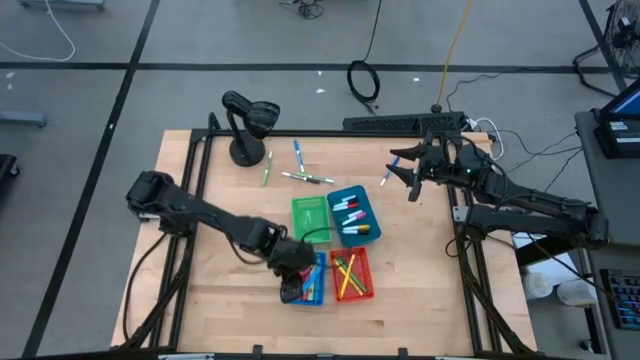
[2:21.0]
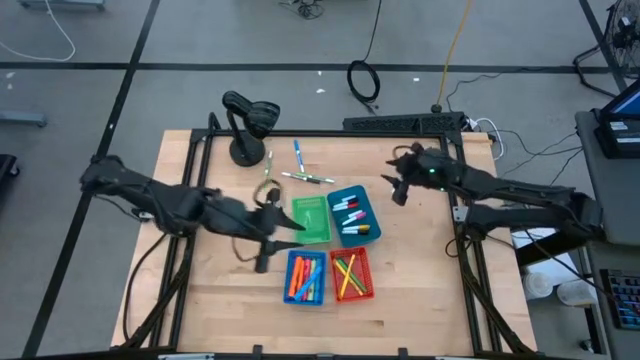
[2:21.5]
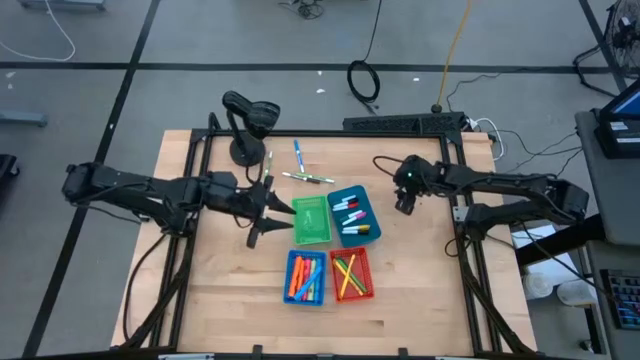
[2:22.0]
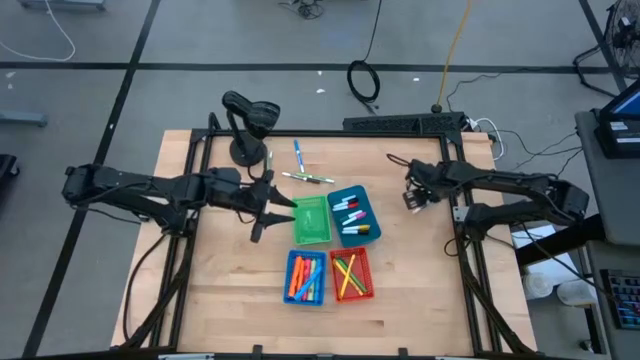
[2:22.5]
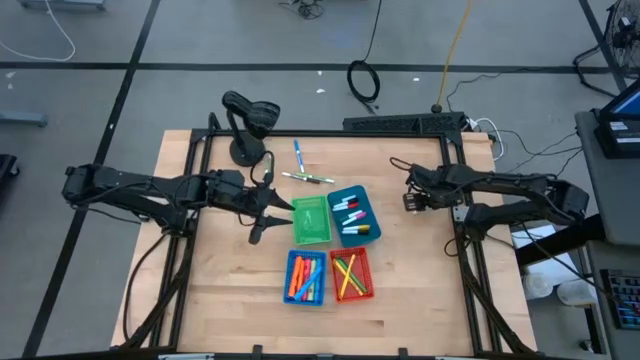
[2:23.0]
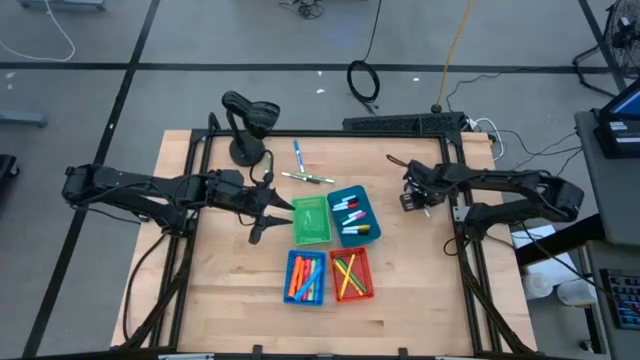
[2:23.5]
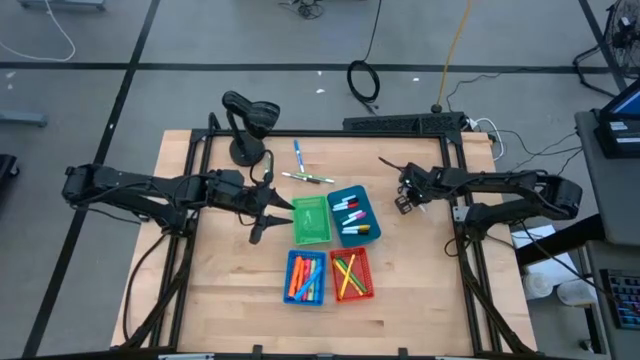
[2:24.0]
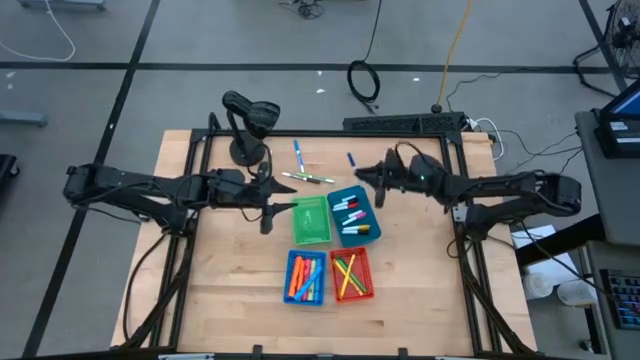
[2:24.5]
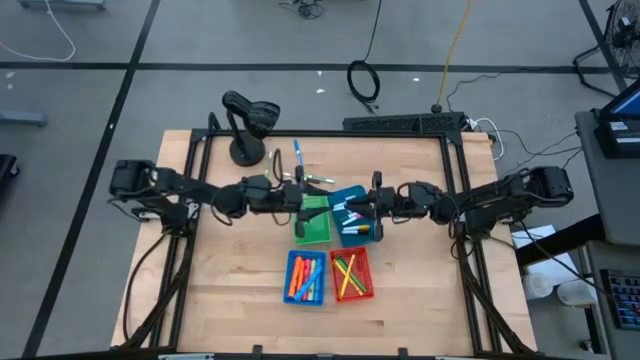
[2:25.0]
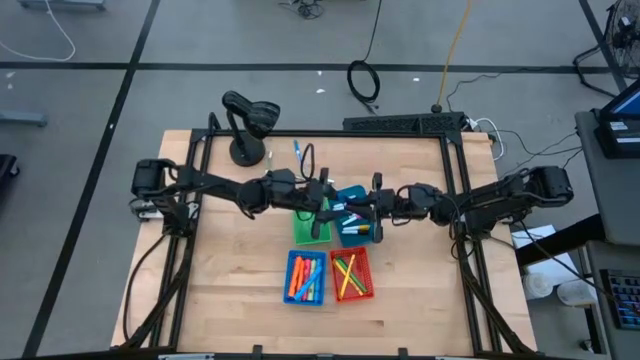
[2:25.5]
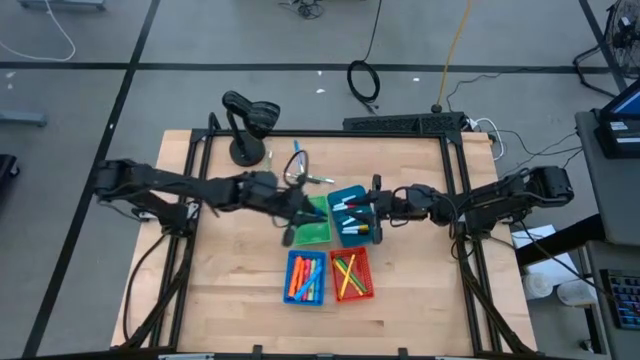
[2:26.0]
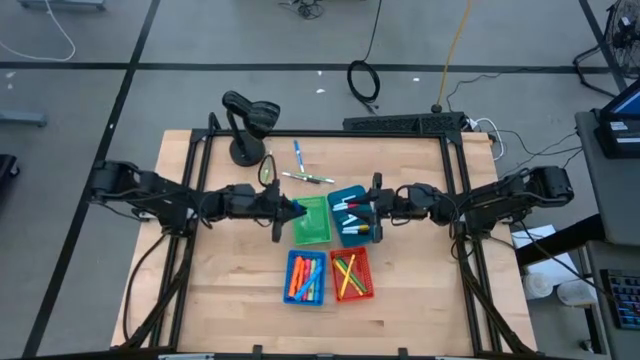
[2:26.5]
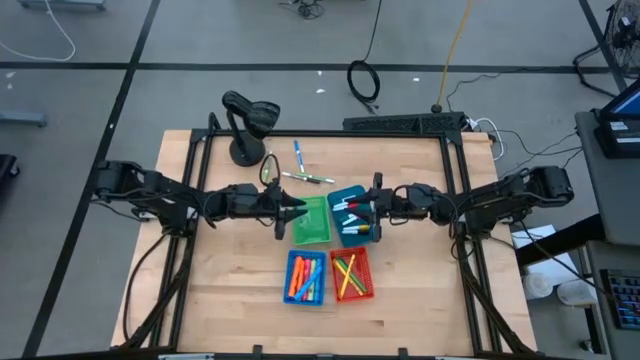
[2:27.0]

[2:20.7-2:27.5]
Task: Pick & Place Markers
Put the blue marker into the green bin

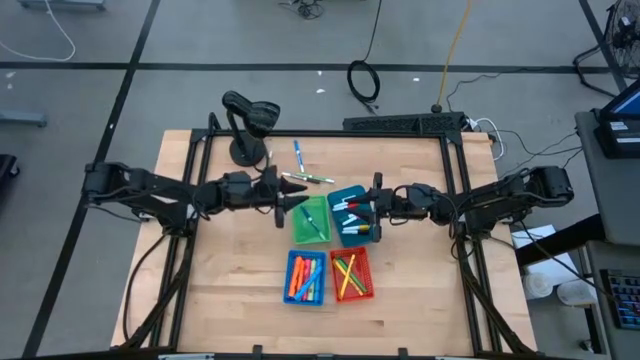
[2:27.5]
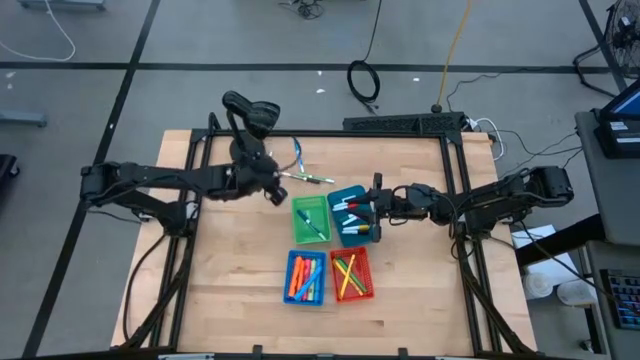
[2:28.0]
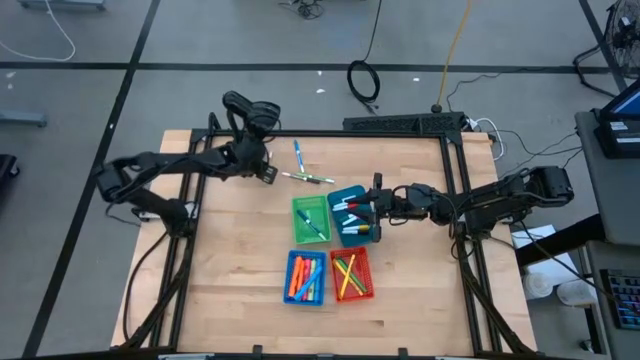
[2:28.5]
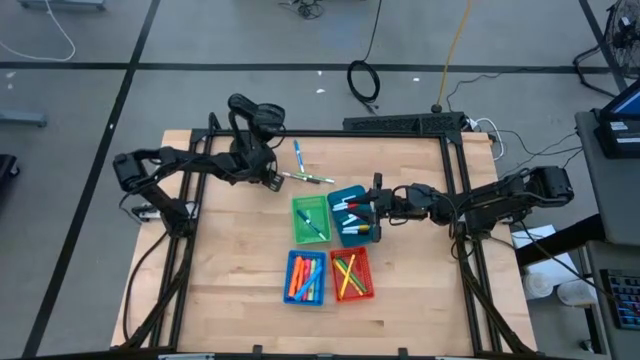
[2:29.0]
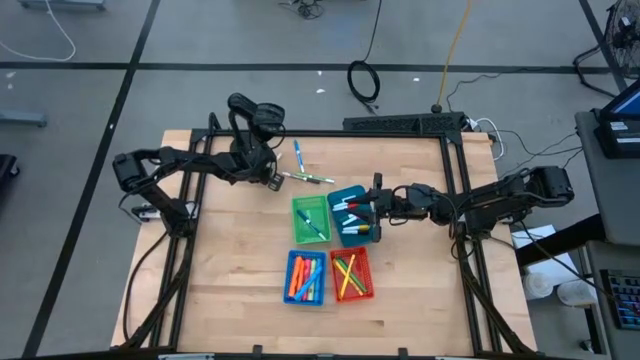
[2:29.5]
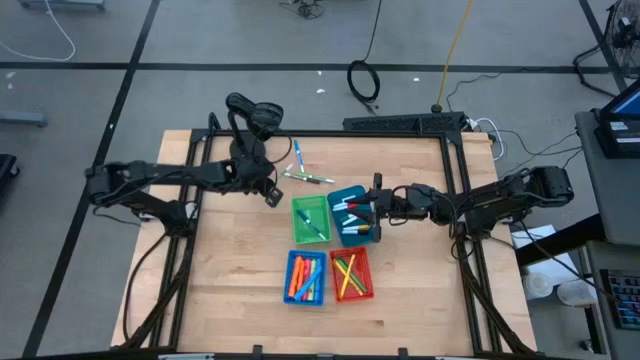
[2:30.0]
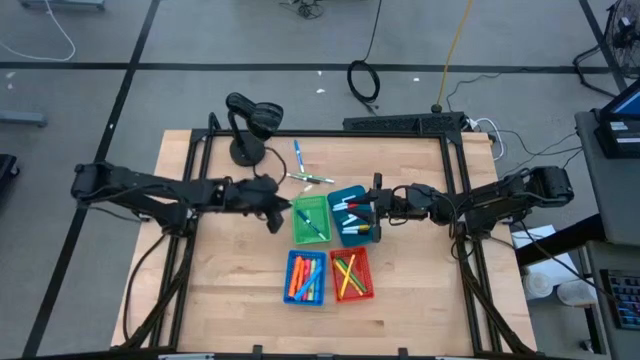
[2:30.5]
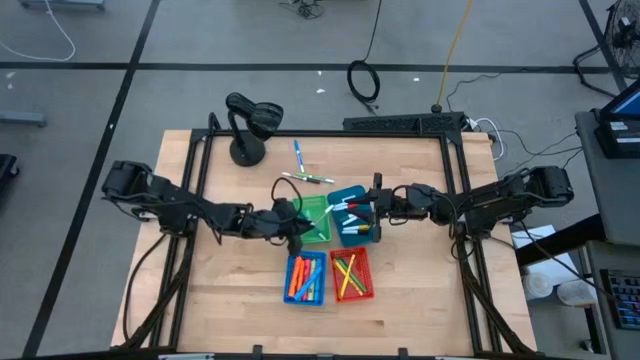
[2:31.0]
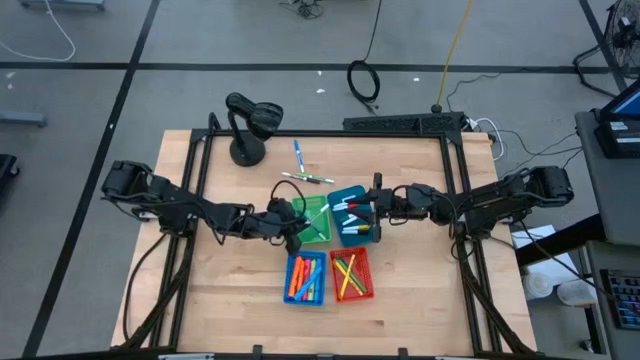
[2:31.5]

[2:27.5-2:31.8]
Put the green marker into the green bin

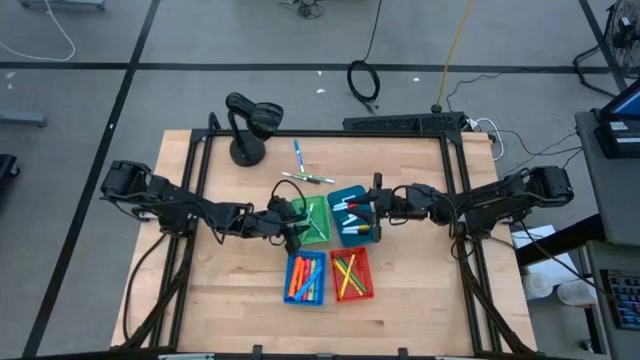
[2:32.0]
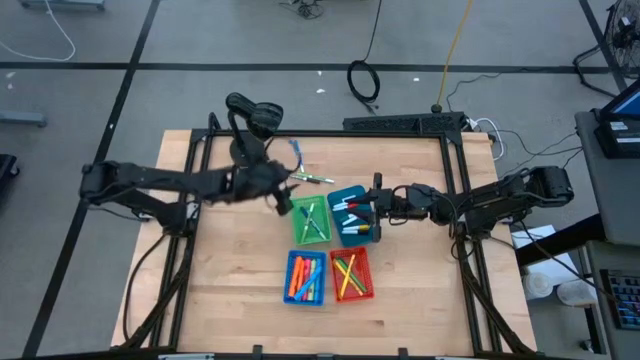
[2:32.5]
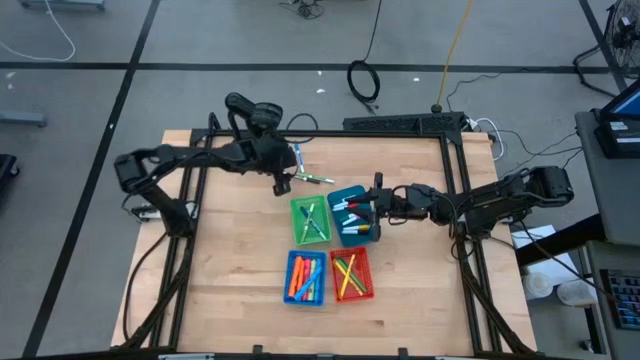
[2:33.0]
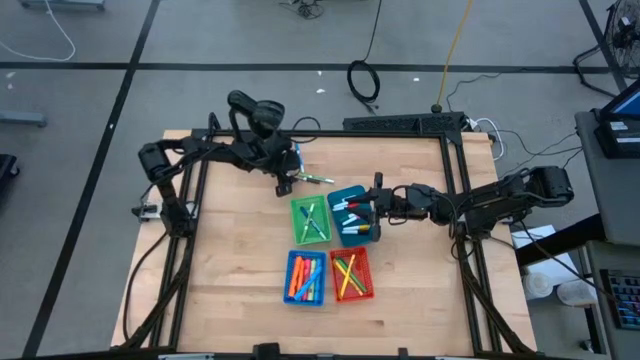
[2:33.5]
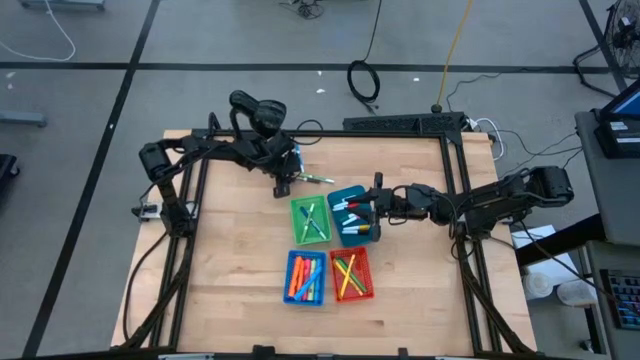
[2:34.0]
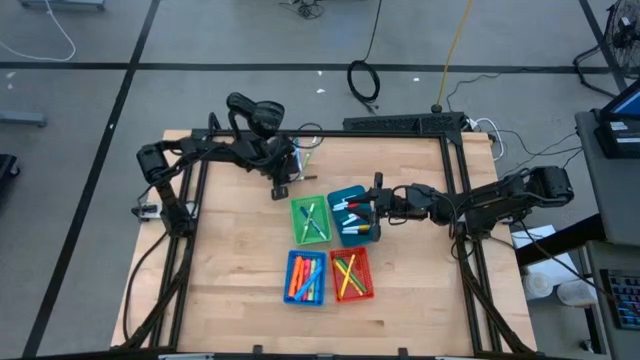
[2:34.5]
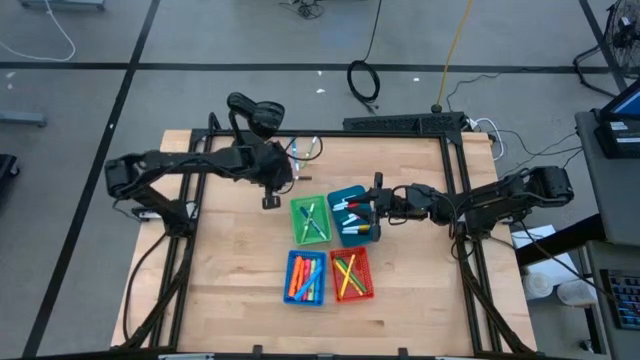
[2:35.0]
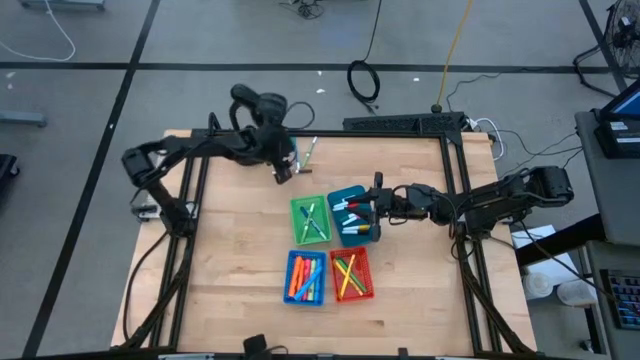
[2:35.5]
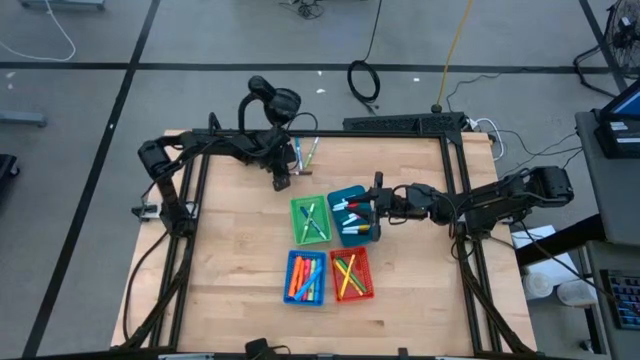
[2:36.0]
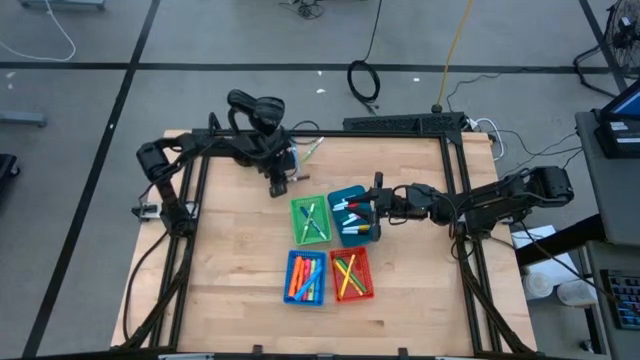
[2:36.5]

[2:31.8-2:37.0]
Put the brown marker into the green bin

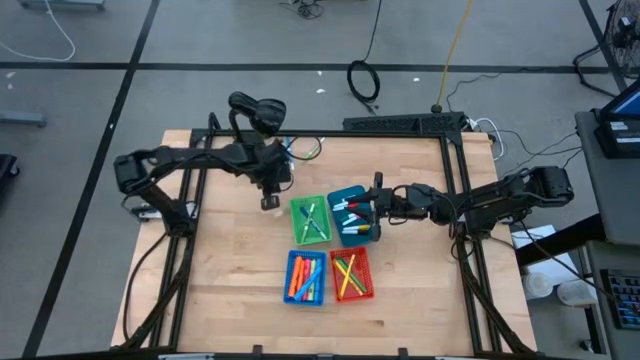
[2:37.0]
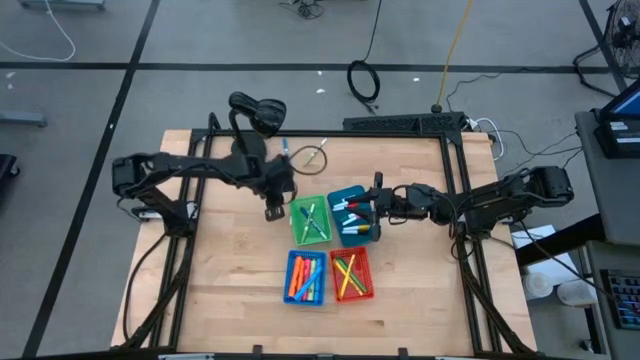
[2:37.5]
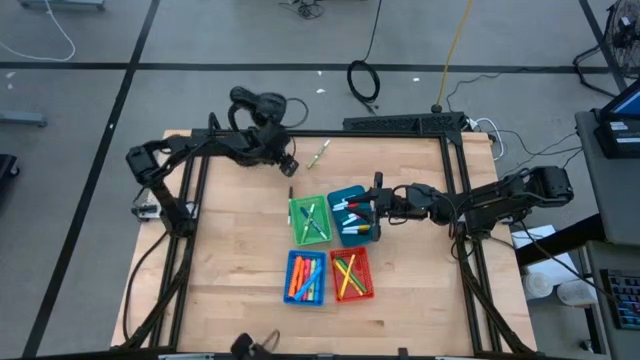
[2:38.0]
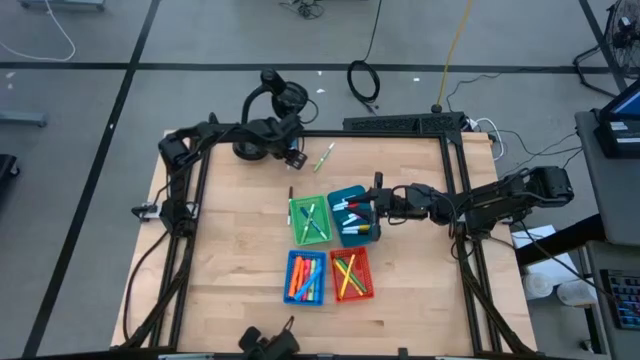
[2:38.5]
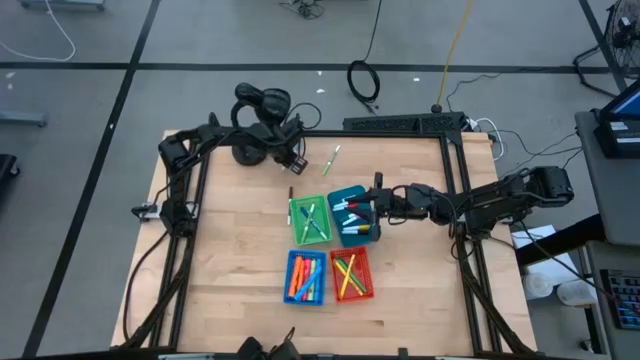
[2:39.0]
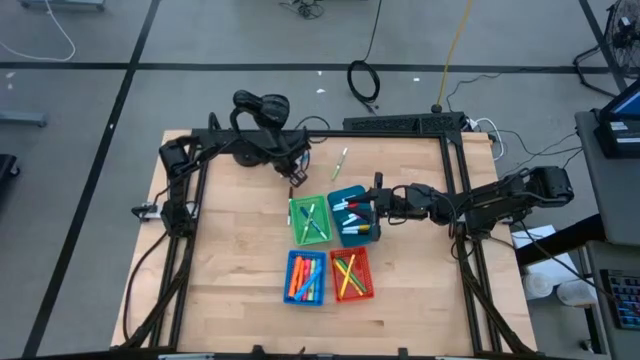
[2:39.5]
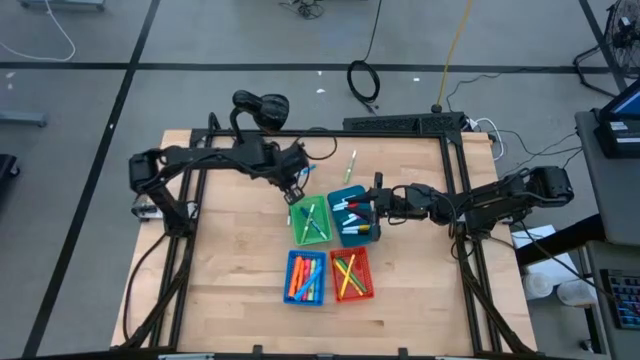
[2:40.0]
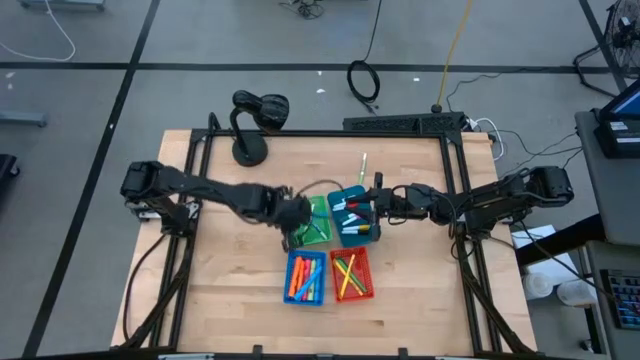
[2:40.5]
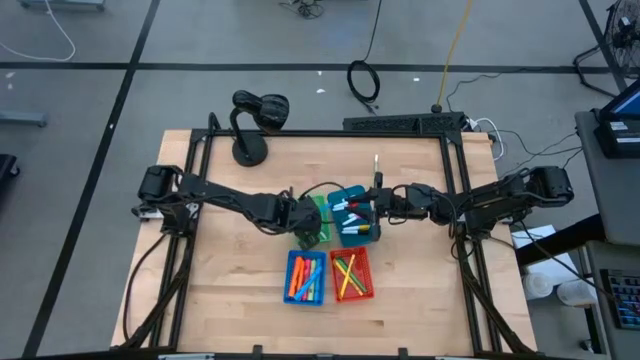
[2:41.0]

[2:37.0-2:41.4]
Put the blue marker into the green bin

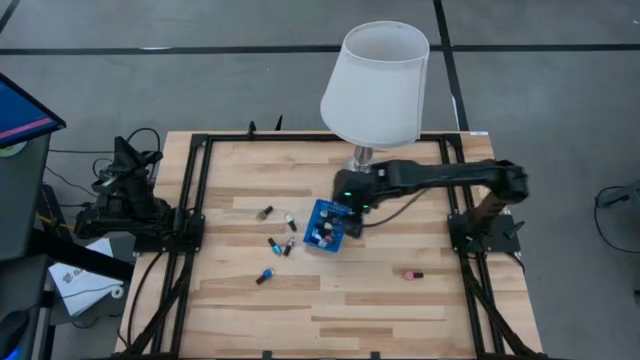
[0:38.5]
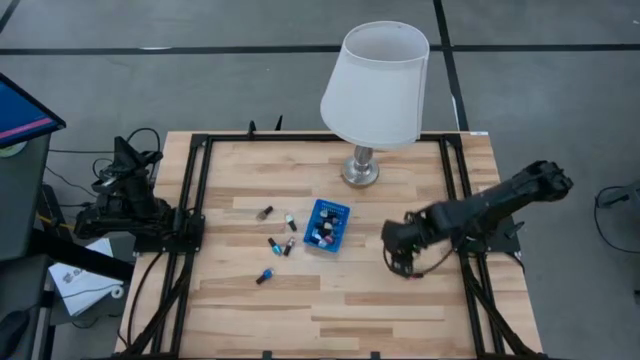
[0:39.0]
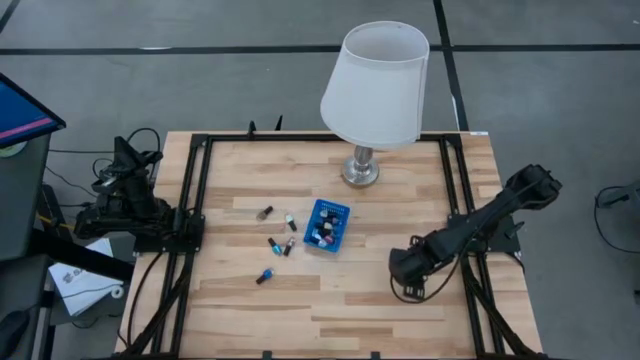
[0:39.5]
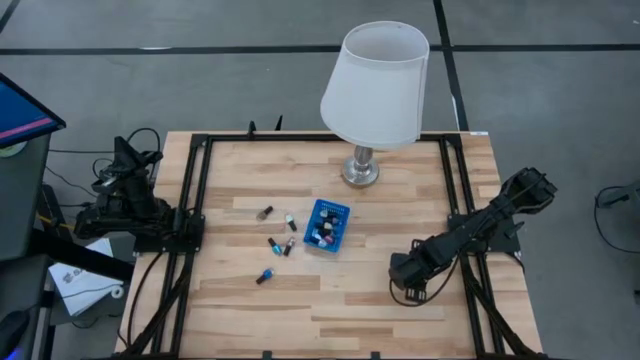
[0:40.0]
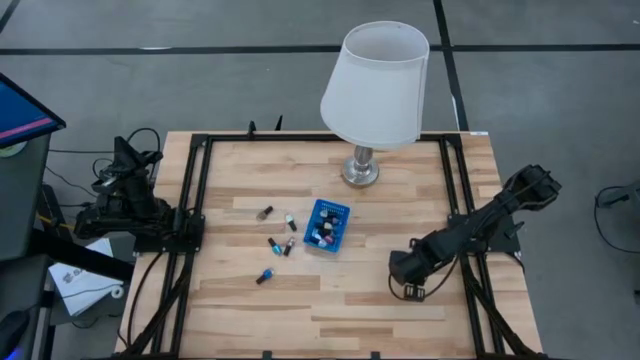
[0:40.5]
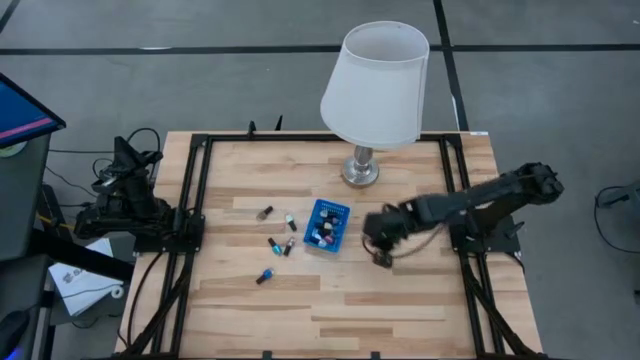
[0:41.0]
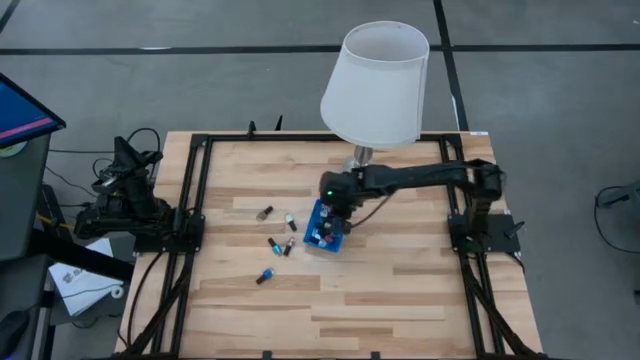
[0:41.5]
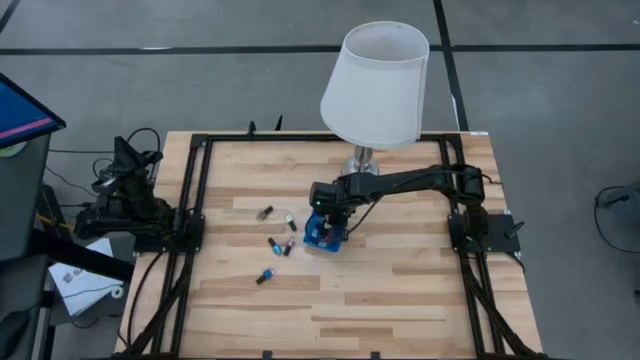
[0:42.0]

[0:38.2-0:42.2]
Task: Pick & Place Nail Polish
Put the light pink nail polish into the blue basket
